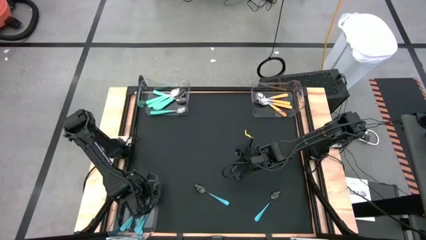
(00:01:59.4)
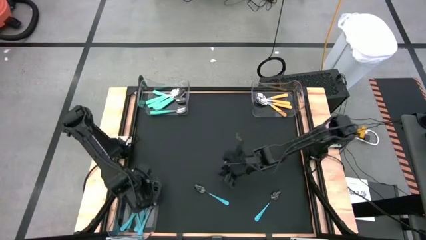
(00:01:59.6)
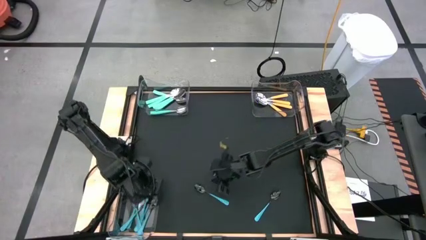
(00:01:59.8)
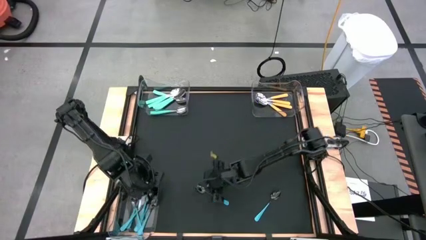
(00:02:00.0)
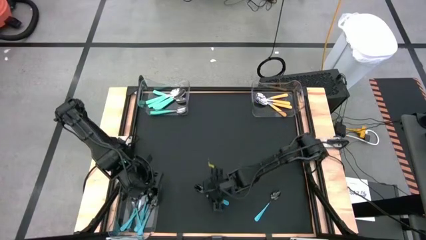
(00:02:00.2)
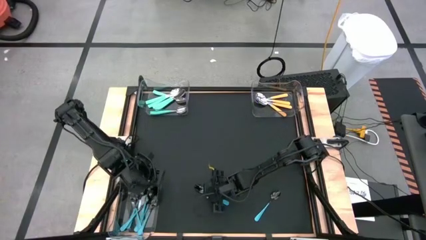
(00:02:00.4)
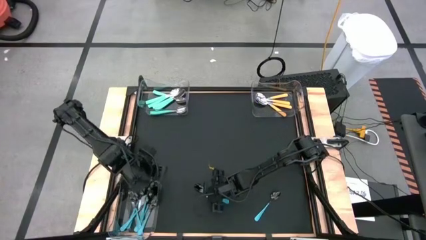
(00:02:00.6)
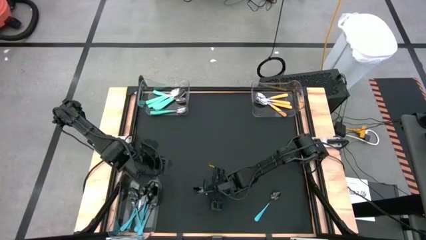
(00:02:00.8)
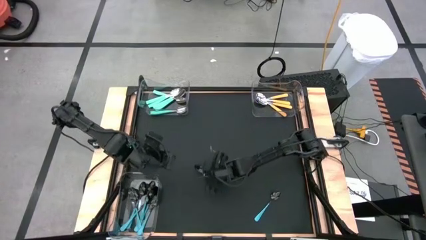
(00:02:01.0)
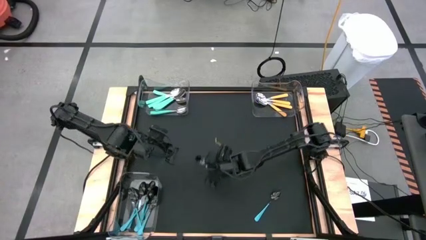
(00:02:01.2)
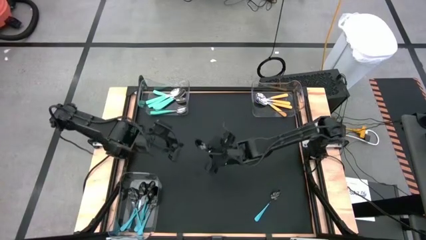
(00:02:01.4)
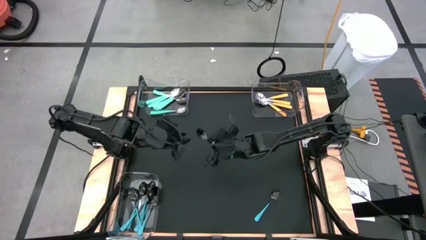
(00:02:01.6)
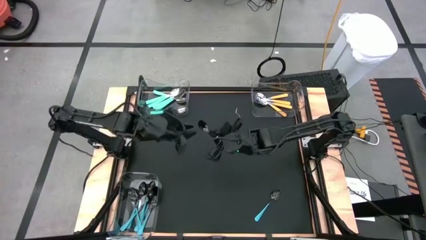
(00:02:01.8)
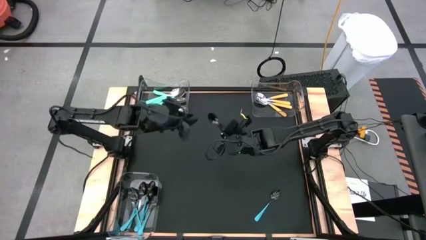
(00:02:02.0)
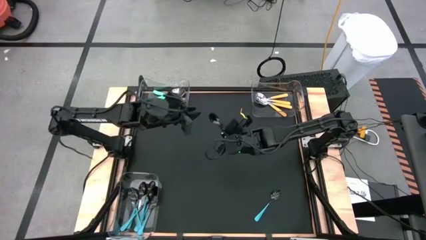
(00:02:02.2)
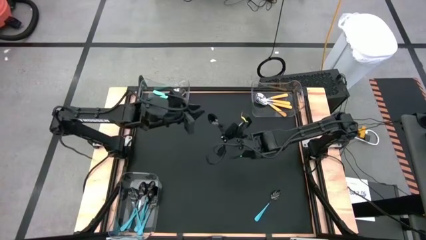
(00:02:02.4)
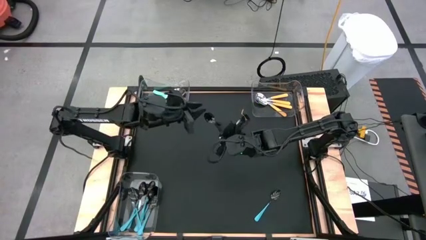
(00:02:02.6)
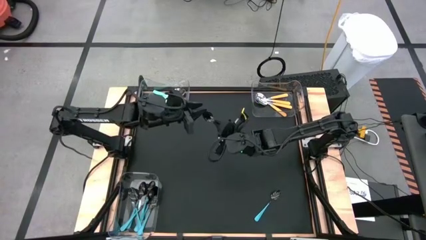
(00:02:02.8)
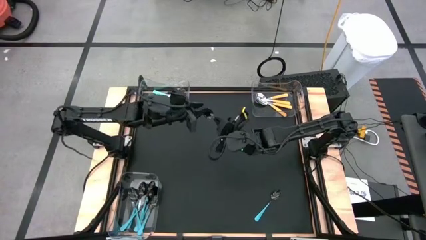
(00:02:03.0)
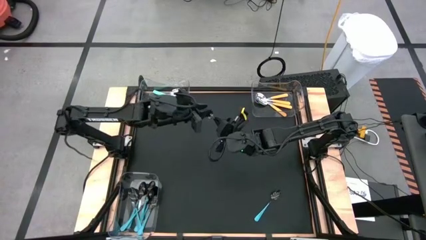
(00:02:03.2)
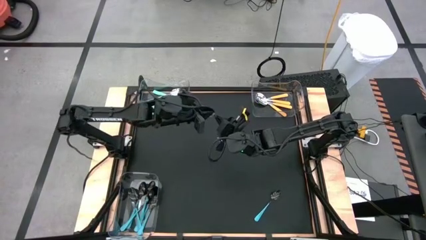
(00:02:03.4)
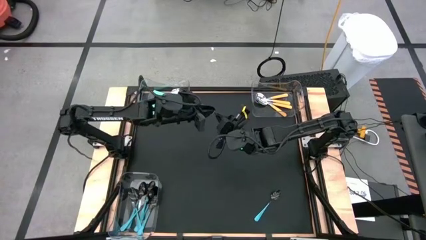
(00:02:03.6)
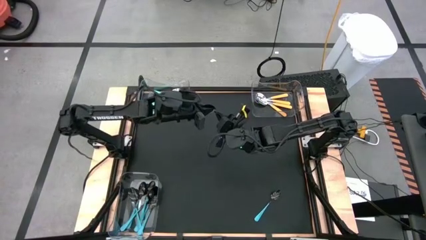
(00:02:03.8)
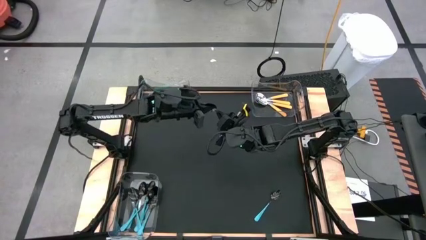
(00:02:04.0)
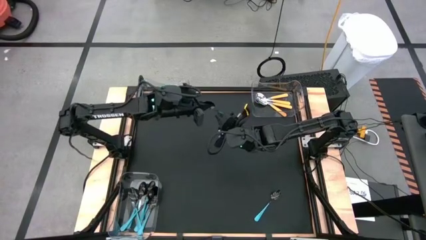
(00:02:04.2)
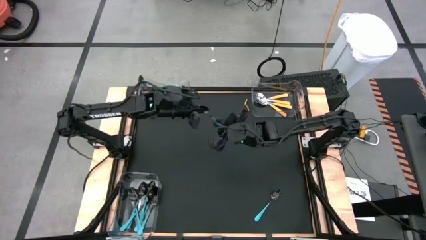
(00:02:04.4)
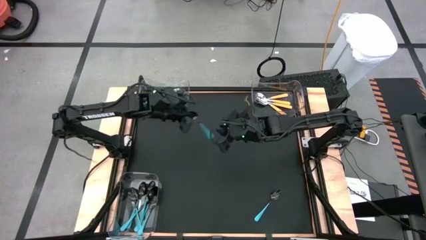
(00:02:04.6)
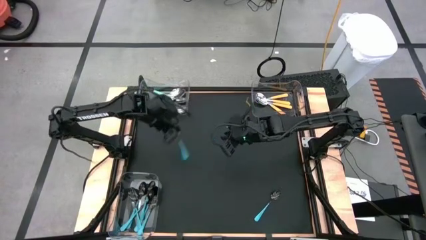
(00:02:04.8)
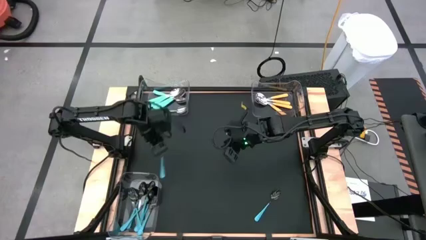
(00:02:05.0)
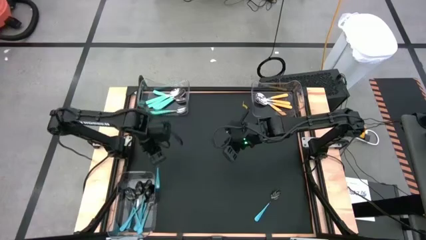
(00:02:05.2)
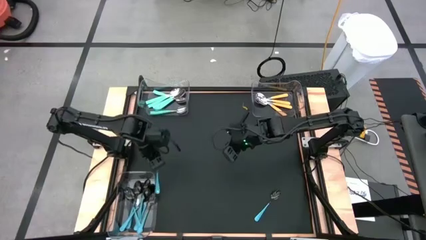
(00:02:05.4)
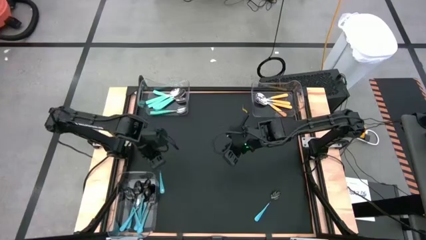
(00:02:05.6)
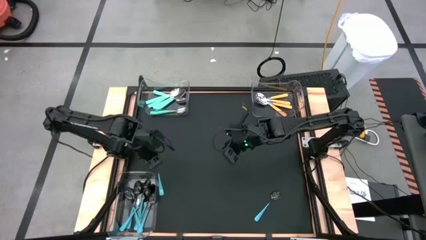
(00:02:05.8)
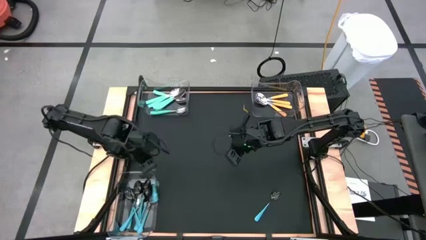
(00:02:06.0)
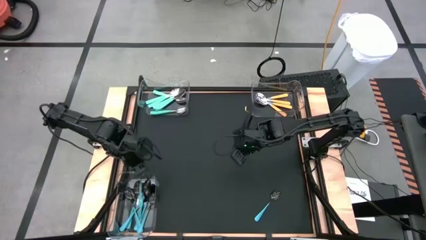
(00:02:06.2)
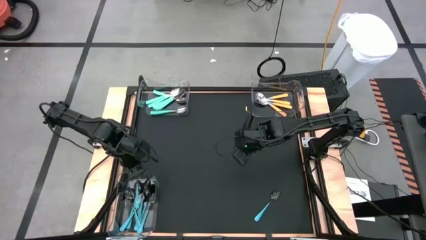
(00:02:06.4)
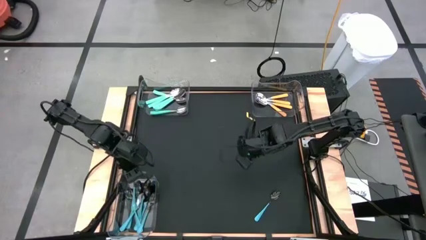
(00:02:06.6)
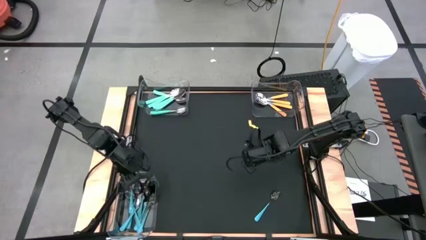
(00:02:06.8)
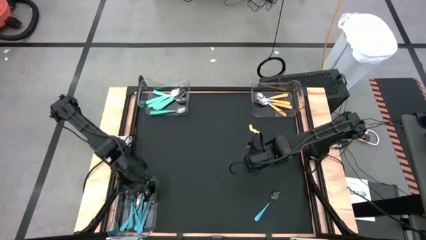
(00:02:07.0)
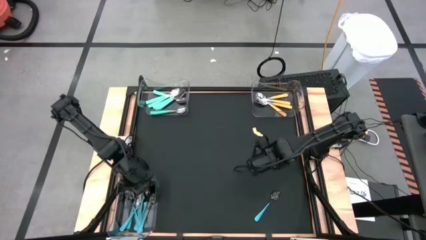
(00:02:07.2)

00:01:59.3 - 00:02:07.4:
Task: Sort silverware by color (type)
Put the blue spoon into the bottom transparent bin

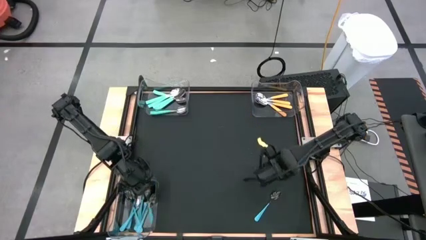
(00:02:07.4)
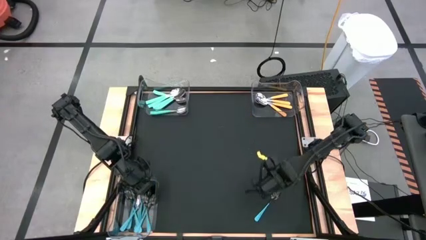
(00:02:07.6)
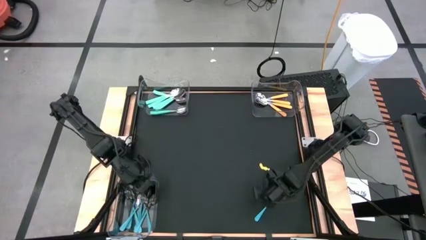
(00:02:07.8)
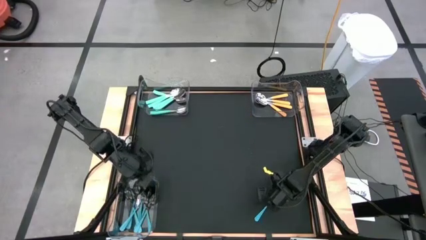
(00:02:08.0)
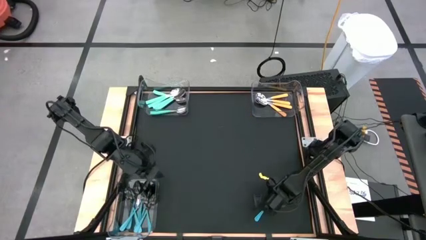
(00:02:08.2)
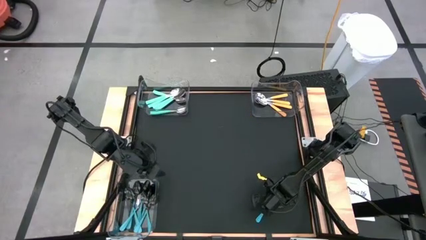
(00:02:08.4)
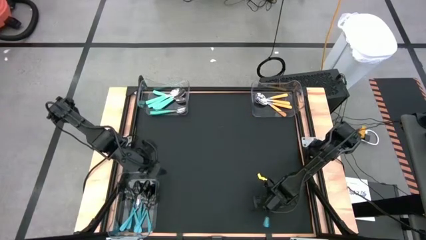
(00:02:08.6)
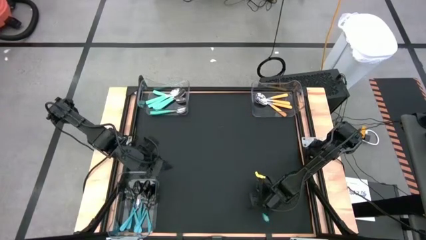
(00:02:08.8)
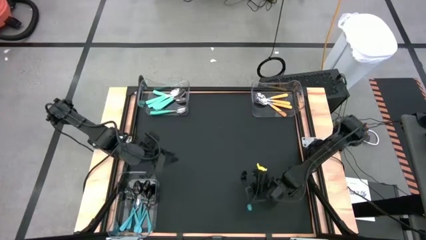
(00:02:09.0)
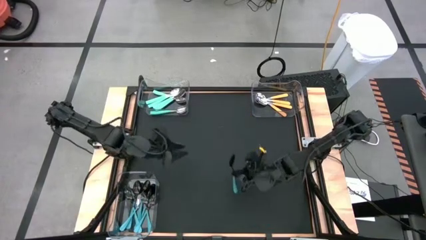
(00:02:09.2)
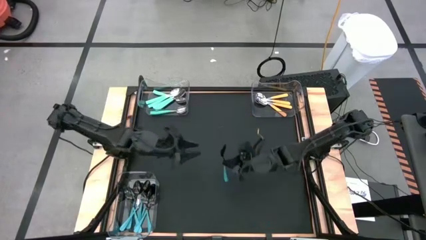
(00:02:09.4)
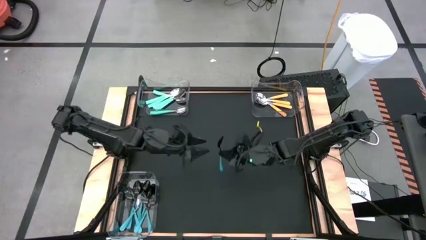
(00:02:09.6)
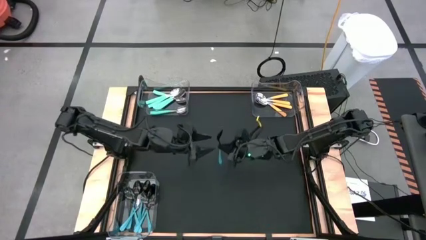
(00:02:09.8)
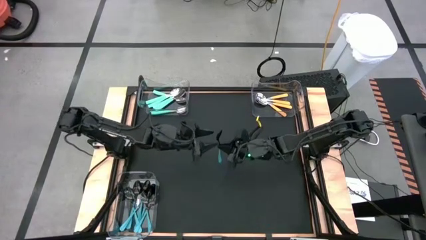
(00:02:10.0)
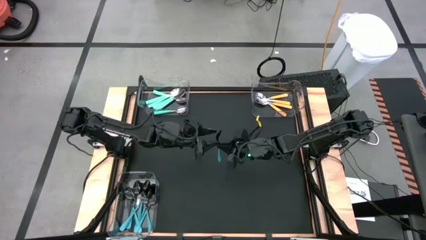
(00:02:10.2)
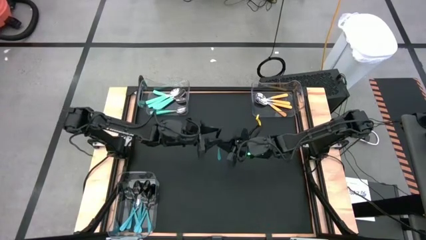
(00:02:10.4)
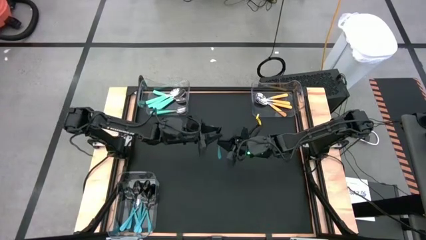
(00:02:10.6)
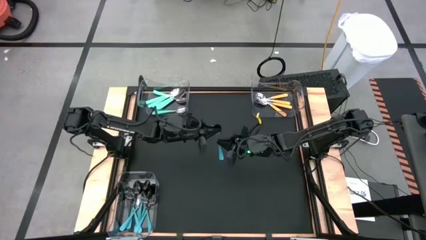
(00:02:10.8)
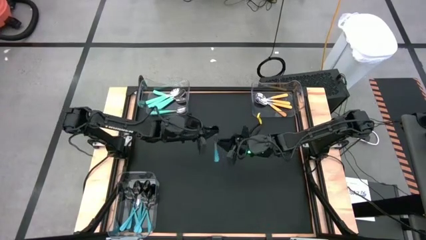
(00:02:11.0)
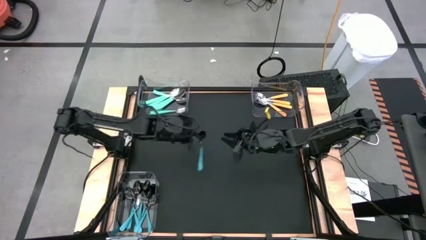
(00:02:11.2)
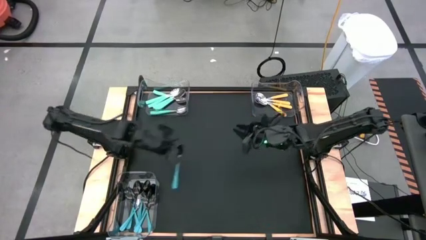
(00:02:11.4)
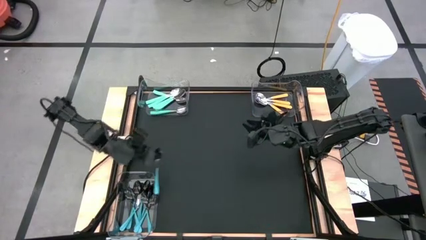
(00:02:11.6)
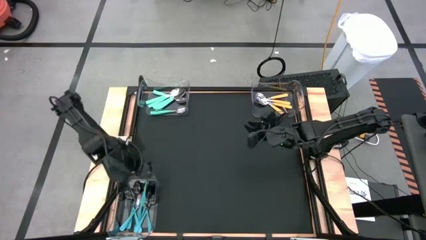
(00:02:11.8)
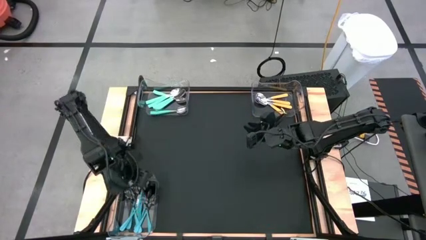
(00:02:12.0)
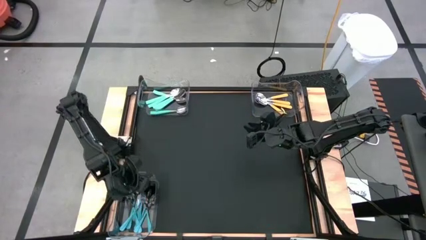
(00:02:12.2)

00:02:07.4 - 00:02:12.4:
Put the blue spoon into the bottom transparent bin

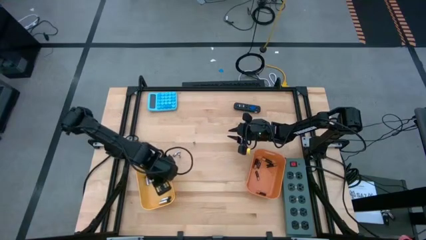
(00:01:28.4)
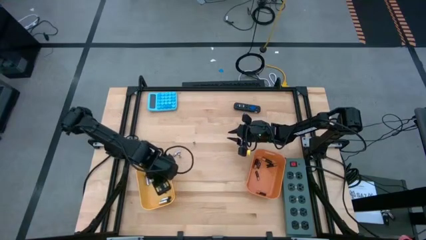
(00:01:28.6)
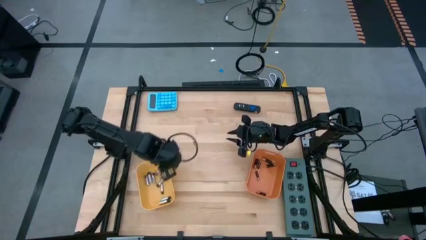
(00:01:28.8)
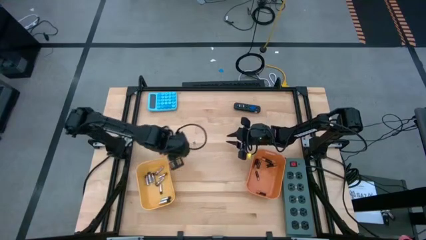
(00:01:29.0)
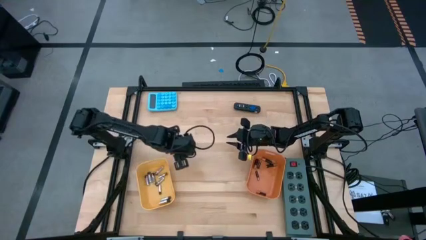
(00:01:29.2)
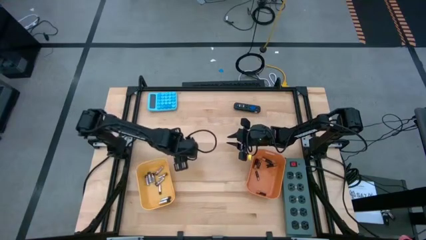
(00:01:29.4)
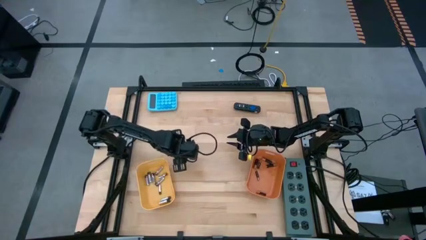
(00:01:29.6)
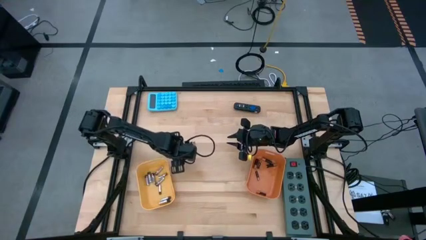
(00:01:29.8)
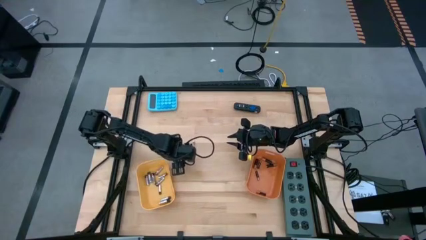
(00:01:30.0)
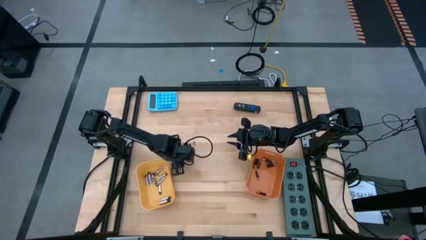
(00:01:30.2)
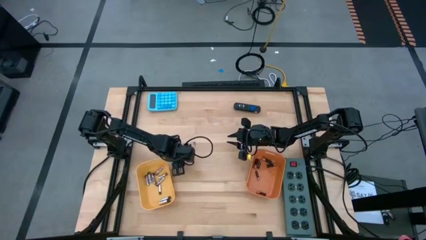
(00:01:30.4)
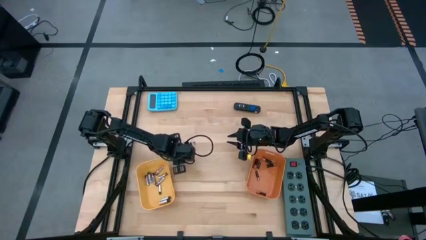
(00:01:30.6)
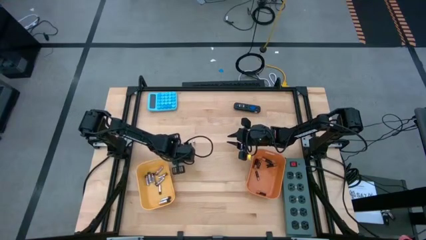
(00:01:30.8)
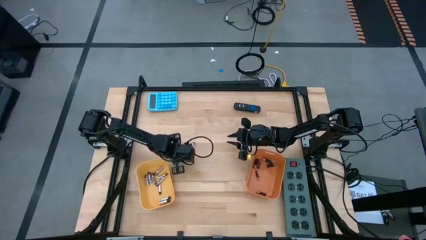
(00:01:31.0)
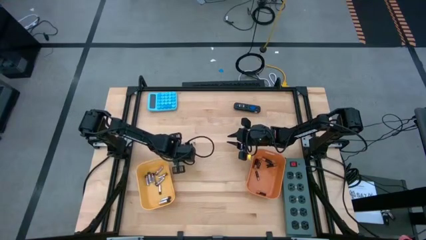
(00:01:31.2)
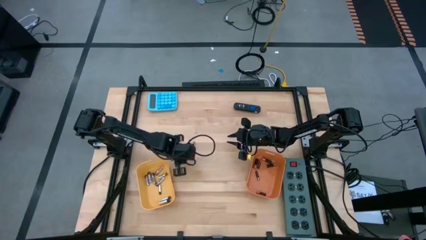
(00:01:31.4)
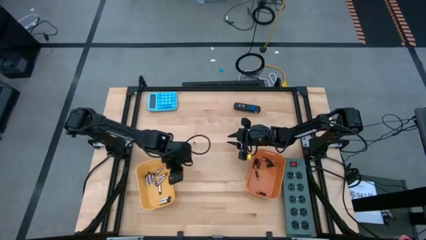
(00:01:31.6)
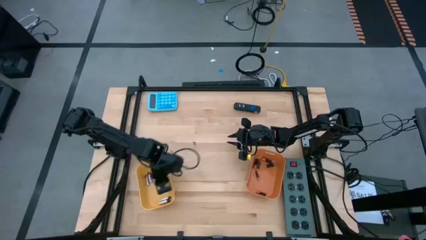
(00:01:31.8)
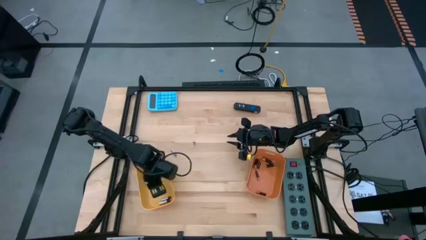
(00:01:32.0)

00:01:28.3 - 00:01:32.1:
Task: Sort batteries
Put the silver battery into the yellow bin

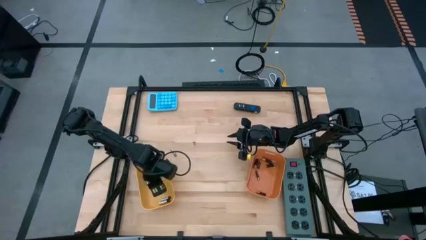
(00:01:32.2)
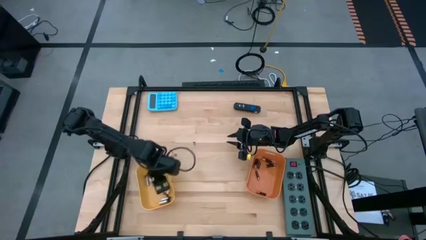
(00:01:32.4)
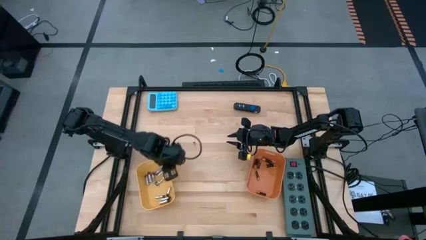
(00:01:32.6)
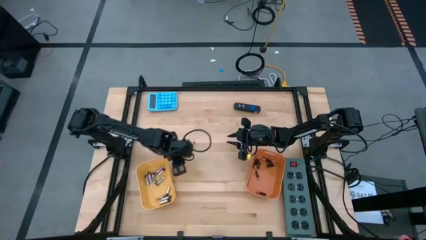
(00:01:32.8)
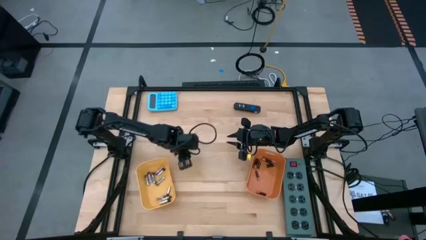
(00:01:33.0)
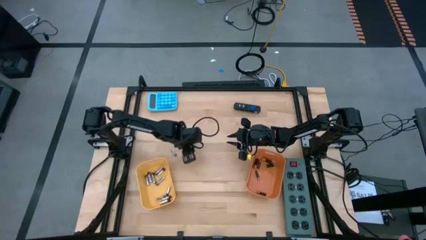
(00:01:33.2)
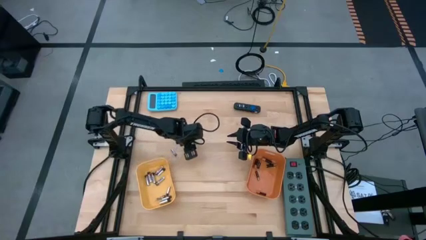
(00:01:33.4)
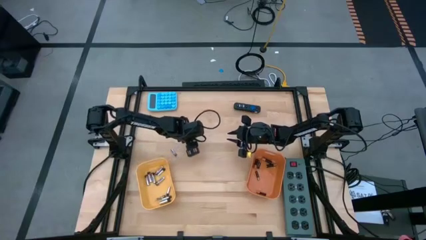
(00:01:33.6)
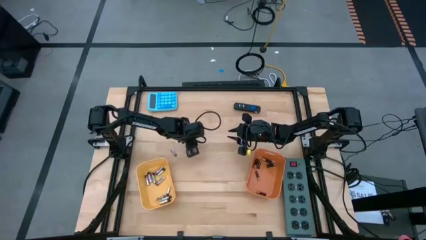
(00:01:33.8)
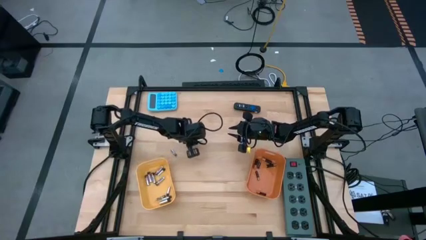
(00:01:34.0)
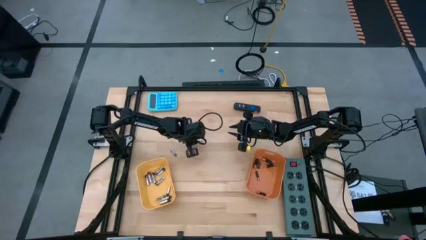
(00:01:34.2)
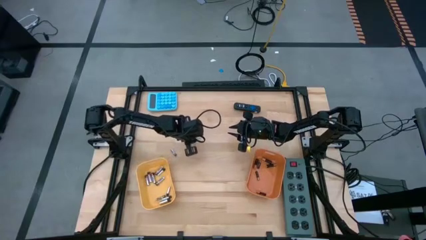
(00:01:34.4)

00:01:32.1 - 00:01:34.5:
Put the silver battery into the yellow bin
